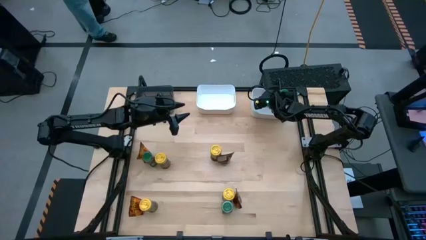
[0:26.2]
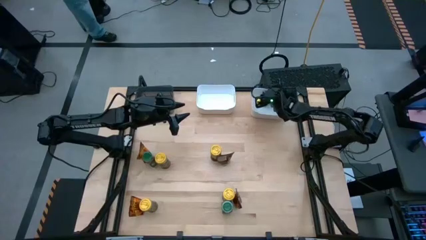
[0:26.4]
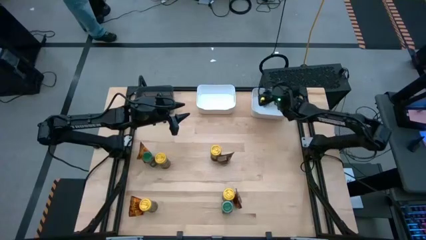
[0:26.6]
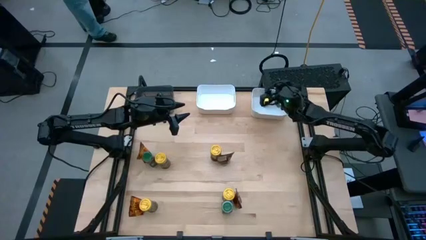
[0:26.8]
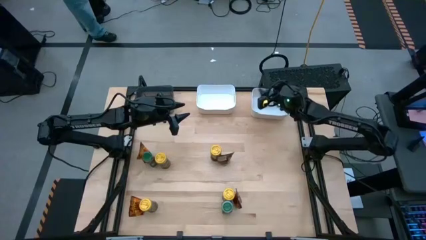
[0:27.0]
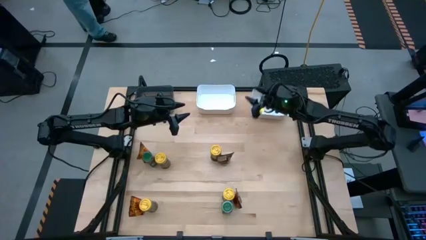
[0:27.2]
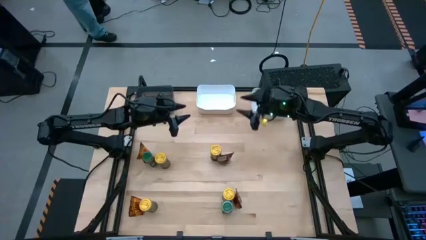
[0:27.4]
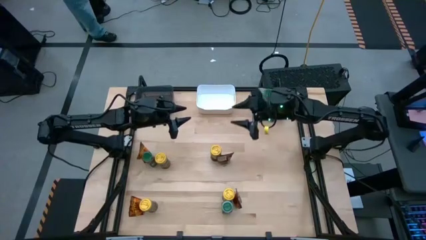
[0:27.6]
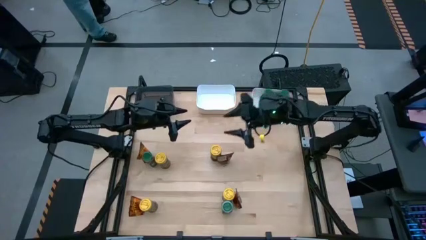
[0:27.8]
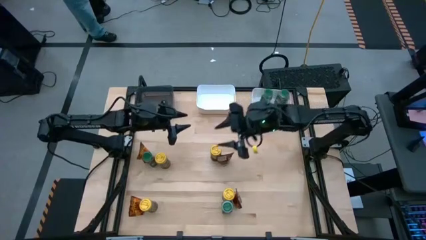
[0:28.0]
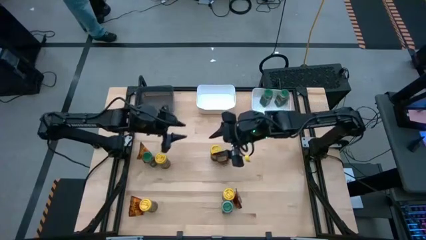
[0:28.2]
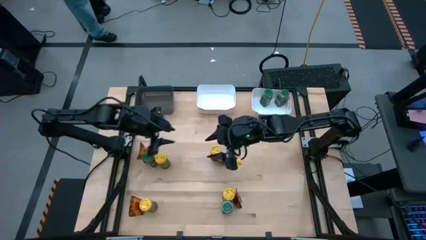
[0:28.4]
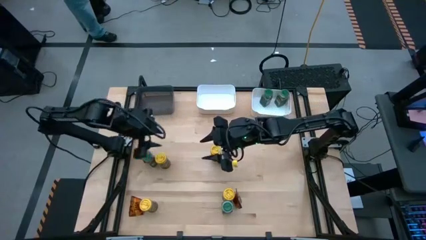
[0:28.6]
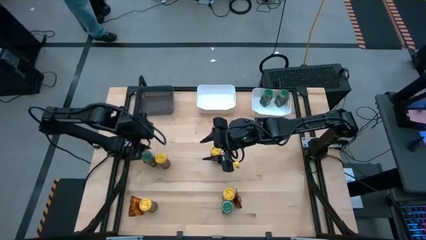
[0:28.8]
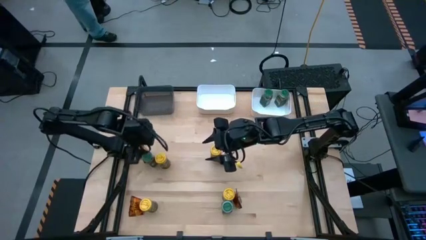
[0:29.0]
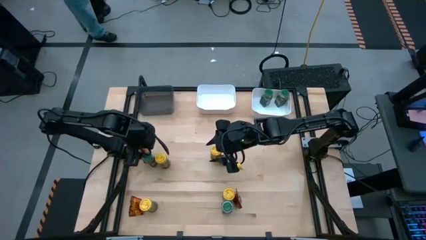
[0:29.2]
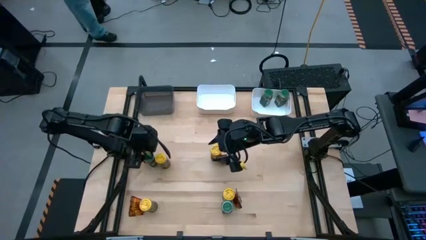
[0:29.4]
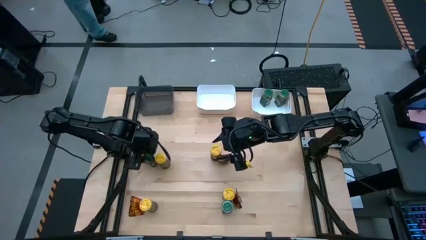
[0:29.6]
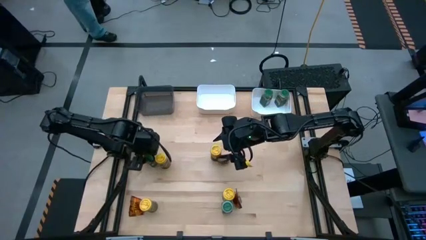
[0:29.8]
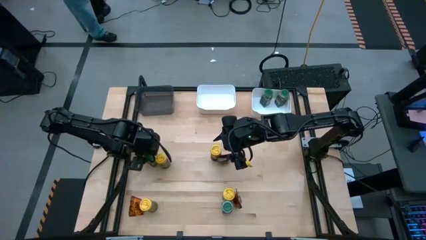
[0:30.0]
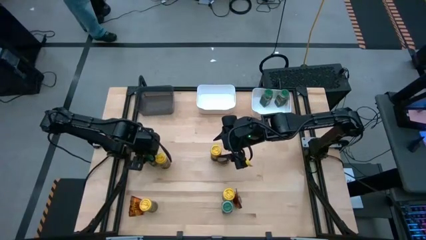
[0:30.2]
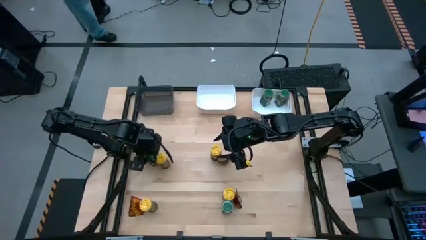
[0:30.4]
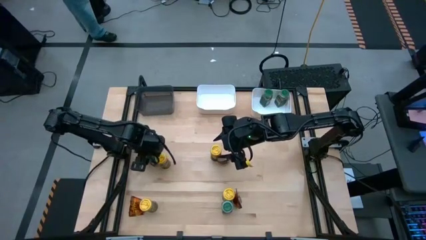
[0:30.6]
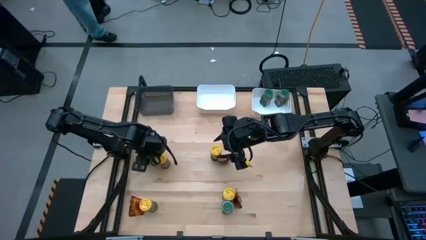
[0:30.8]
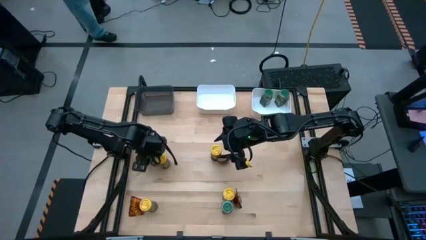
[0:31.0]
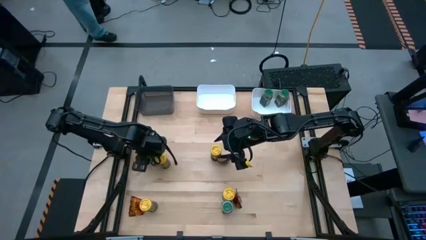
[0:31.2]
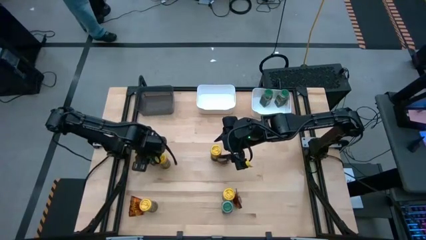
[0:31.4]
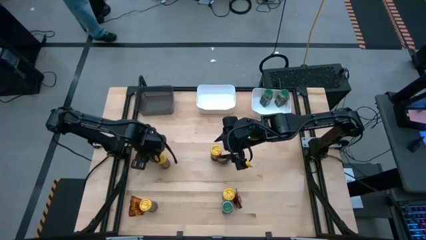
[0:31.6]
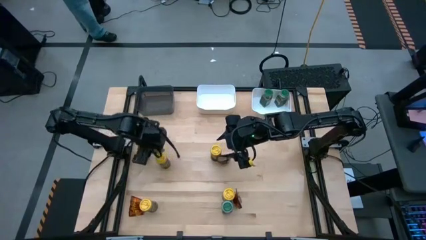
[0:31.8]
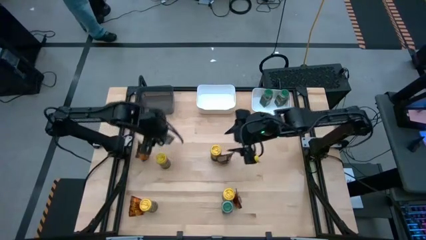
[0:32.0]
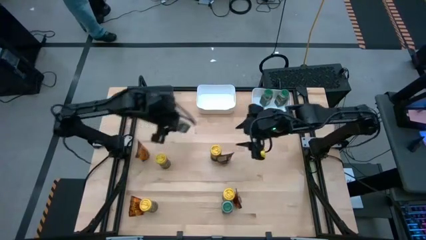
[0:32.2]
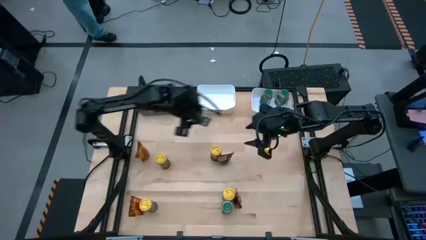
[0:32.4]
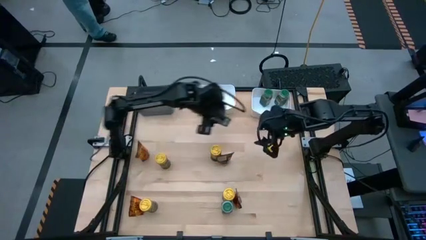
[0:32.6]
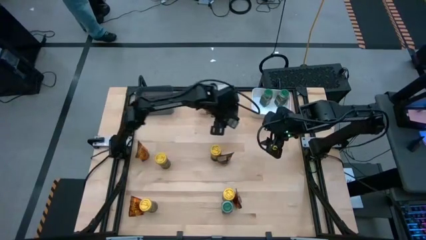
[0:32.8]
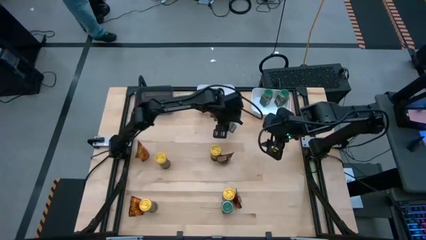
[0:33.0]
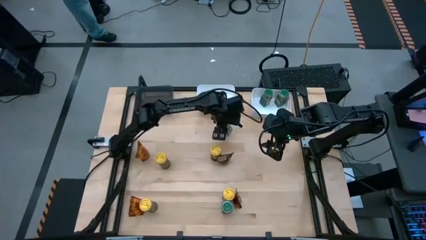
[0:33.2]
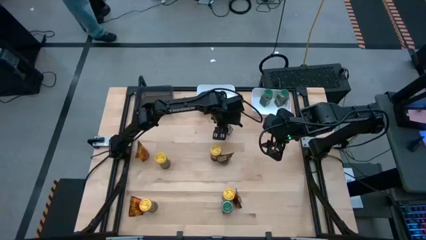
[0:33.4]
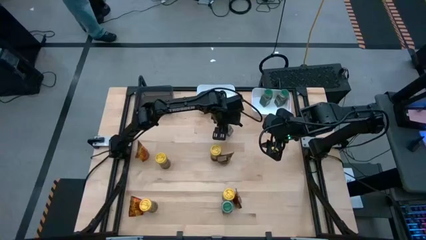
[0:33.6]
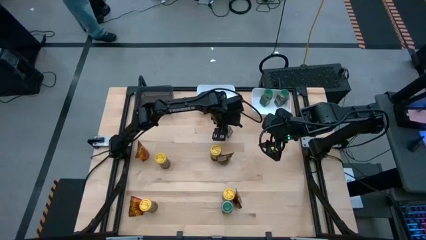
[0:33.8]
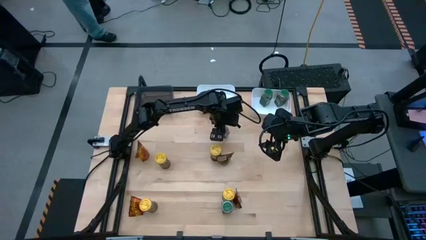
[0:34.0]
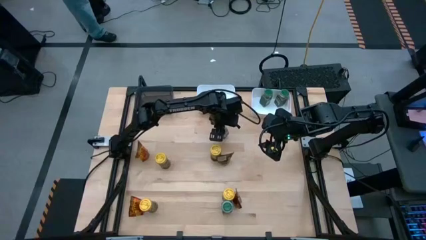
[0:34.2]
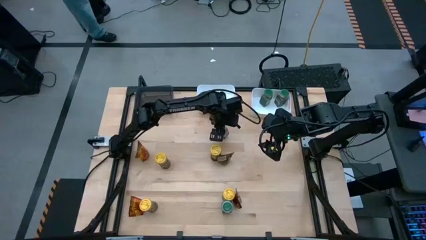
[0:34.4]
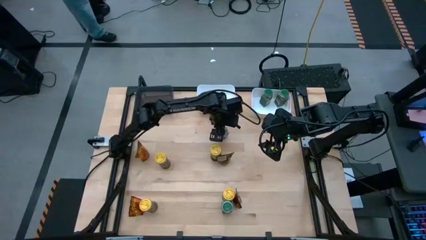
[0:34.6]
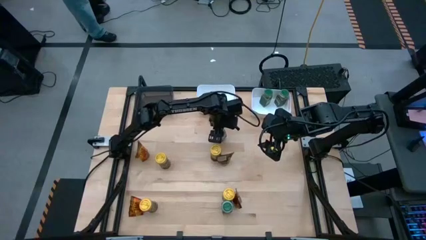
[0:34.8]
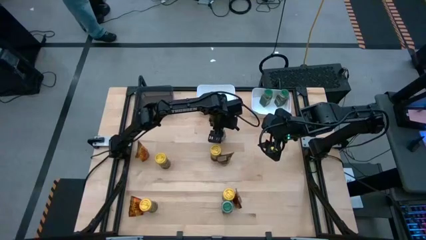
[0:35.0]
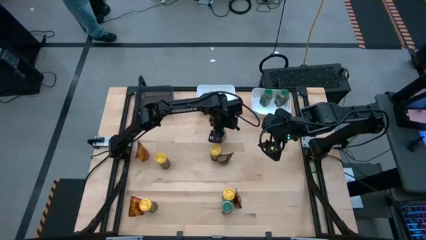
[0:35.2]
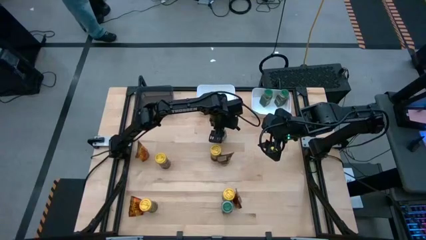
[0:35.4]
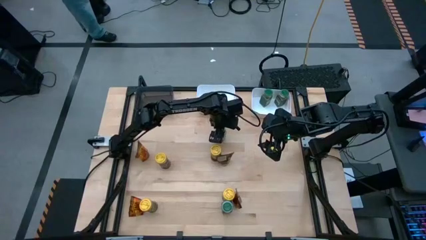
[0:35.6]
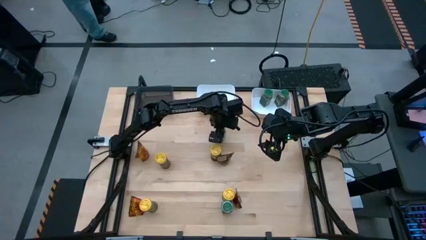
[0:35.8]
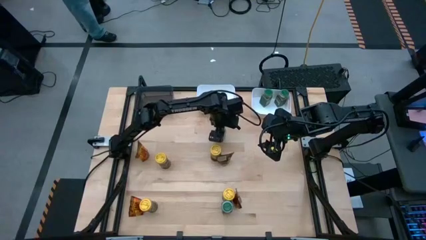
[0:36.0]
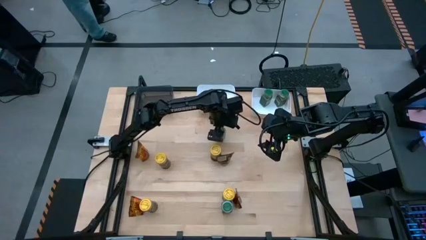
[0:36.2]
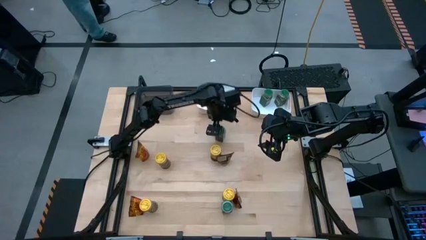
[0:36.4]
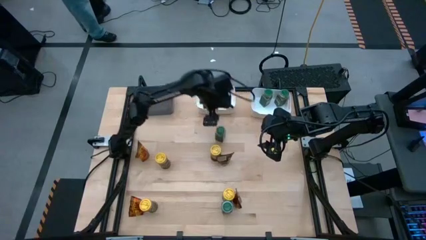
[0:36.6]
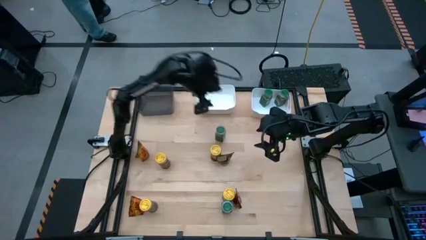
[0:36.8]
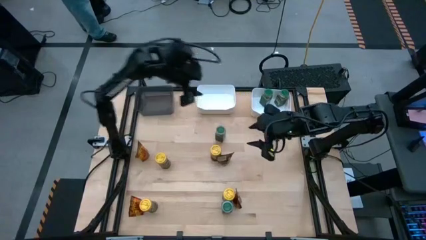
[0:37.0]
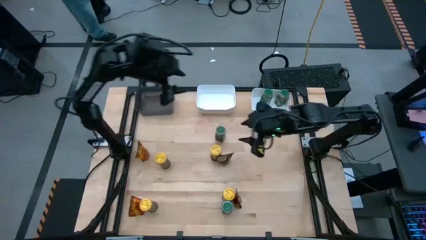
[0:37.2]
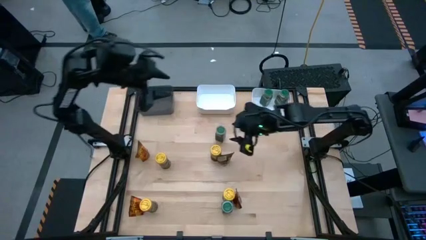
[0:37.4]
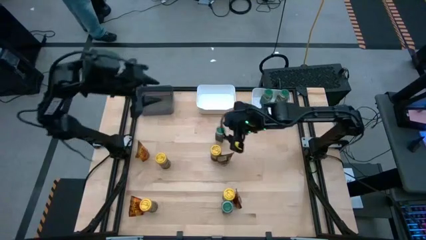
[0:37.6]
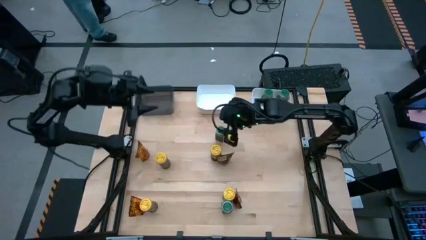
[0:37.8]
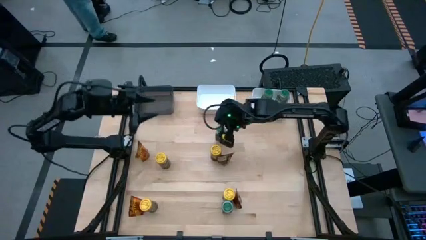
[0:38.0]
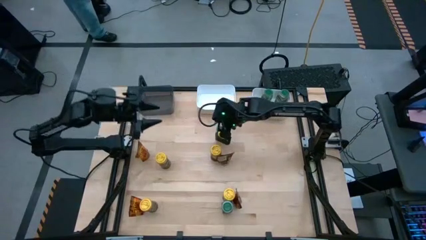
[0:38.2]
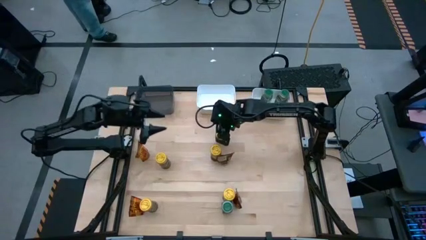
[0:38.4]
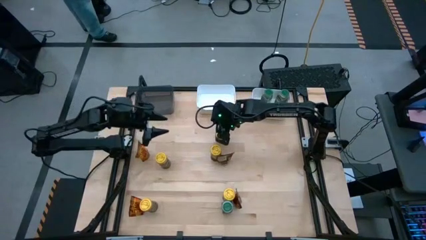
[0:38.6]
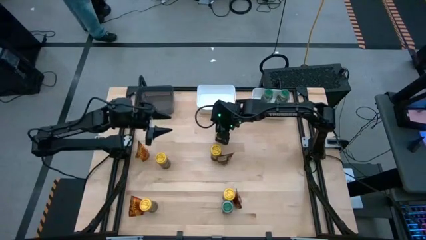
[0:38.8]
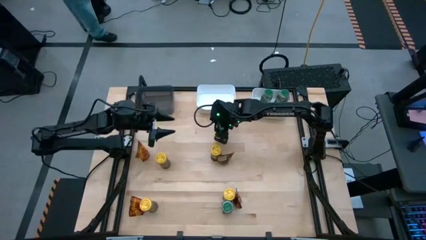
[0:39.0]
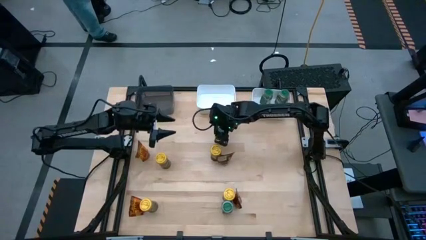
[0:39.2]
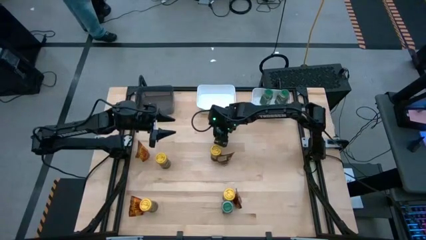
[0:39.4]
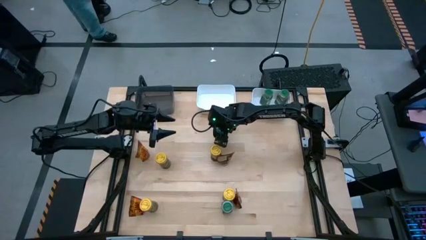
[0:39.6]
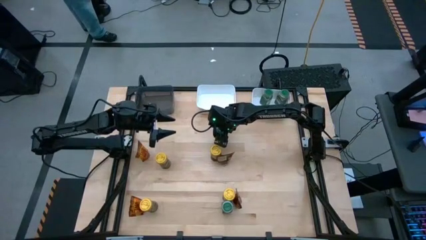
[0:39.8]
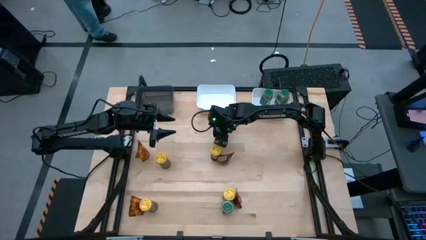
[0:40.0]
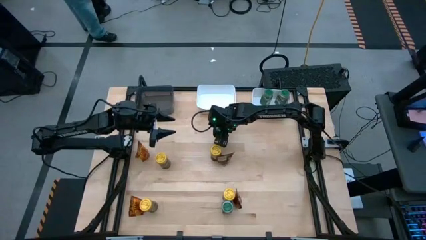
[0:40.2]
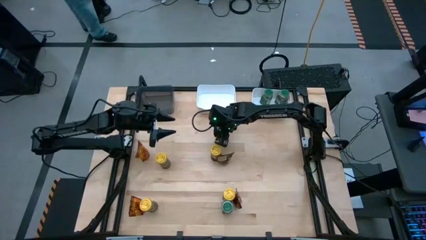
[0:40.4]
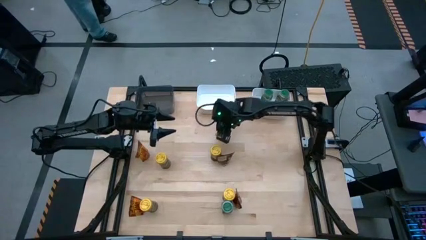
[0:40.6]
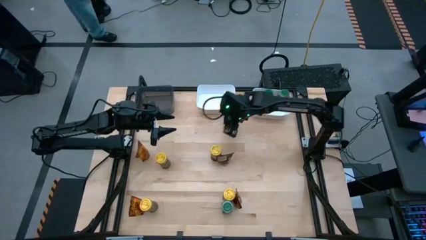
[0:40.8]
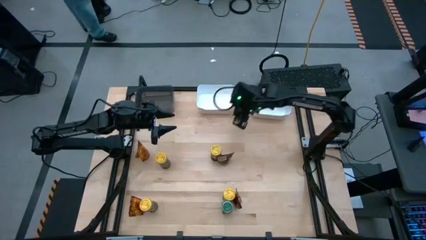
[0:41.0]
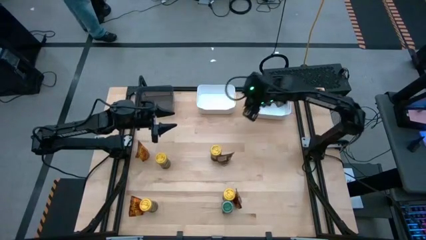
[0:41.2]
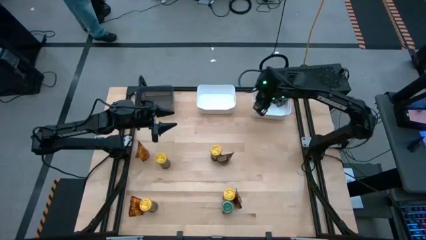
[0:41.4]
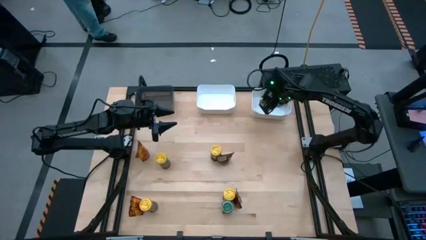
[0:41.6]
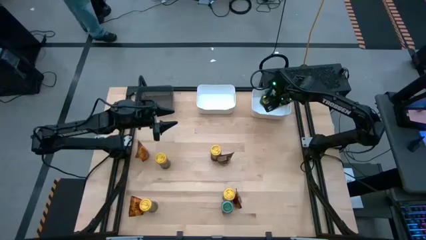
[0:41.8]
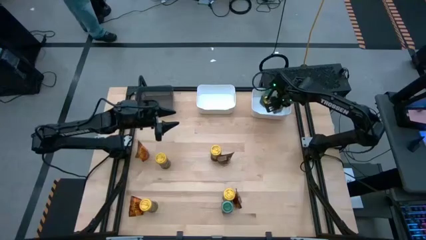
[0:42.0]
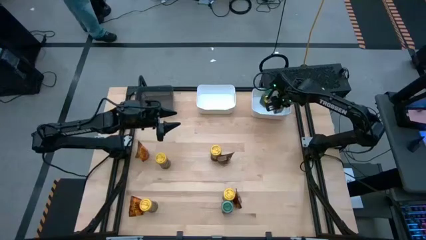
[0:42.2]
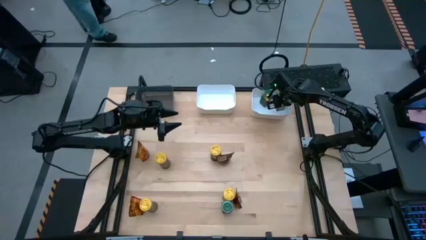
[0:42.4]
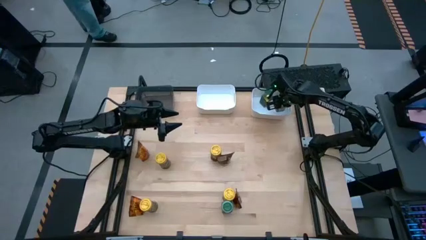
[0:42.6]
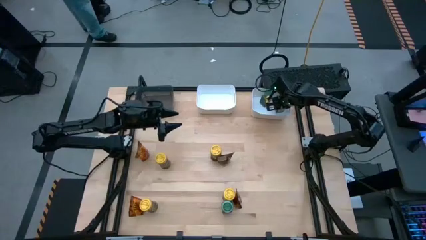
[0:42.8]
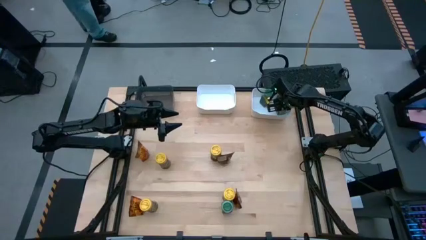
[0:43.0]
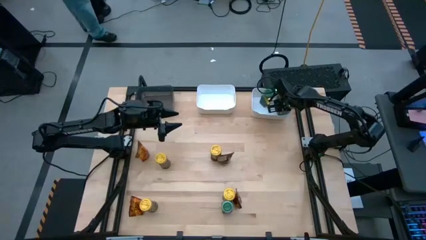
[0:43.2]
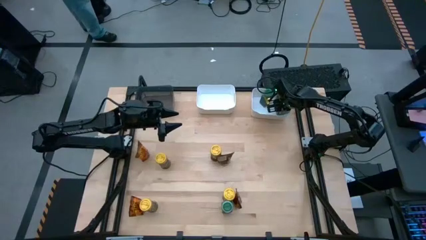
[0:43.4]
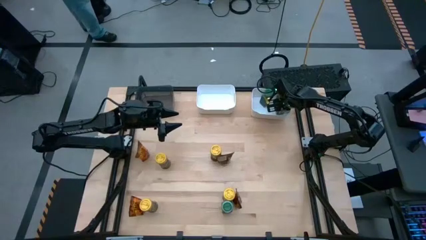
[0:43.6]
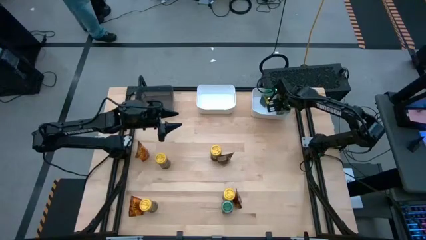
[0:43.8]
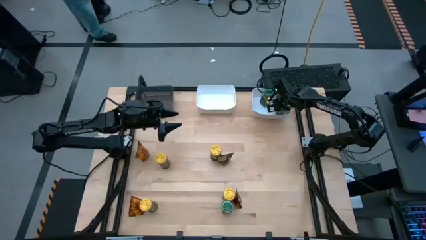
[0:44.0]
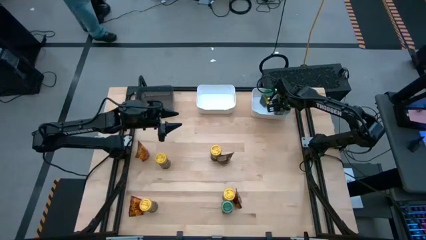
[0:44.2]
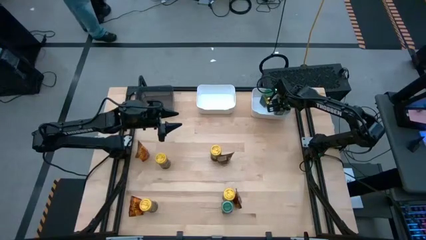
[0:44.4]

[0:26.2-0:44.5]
Task: Sort spices by type
Put the top green seasoning bottle into the right white bin
